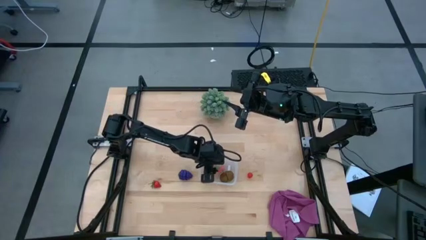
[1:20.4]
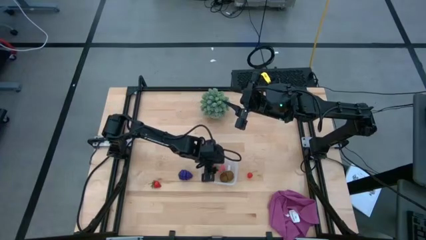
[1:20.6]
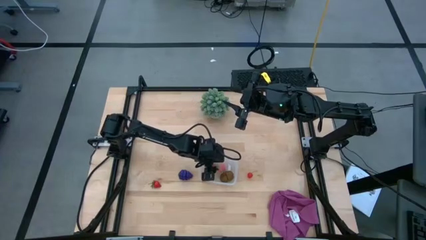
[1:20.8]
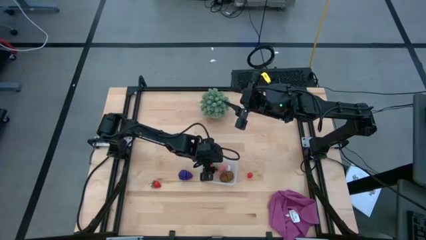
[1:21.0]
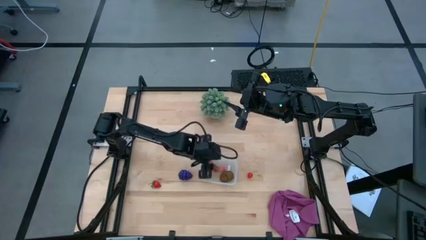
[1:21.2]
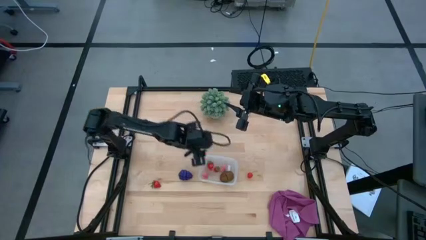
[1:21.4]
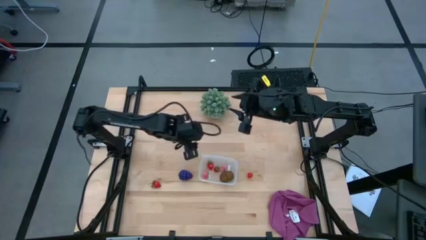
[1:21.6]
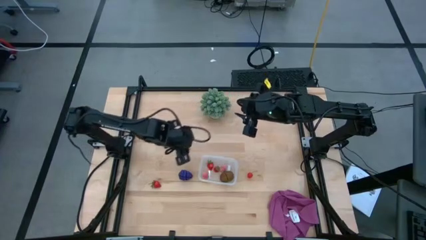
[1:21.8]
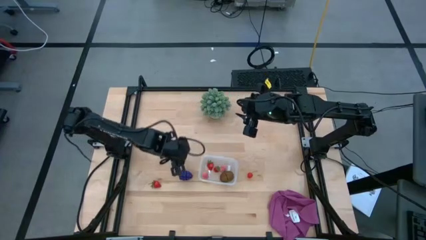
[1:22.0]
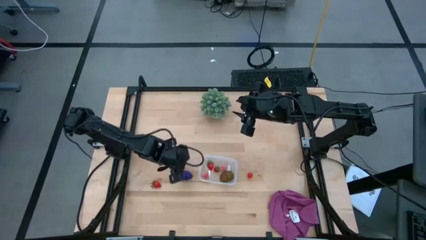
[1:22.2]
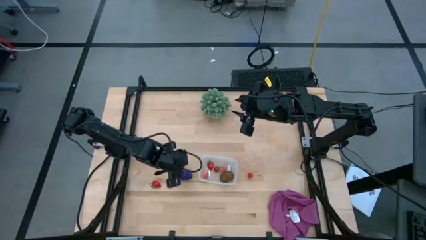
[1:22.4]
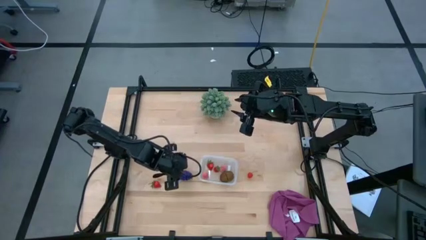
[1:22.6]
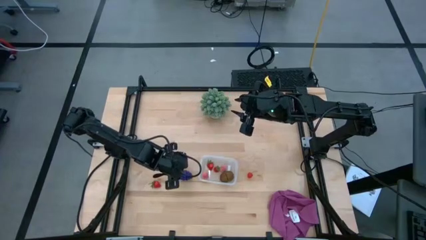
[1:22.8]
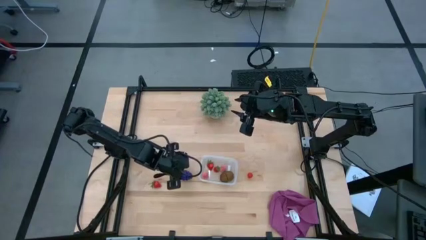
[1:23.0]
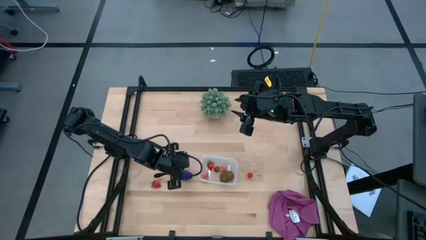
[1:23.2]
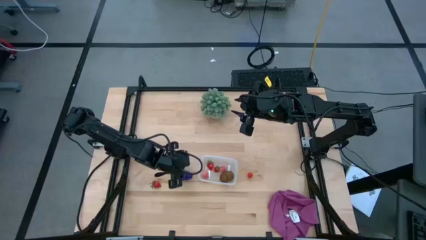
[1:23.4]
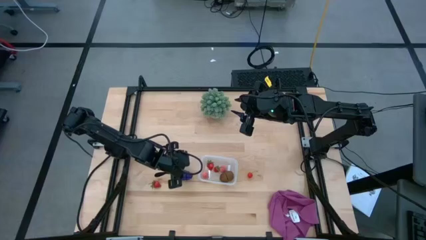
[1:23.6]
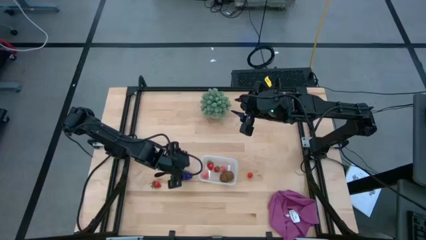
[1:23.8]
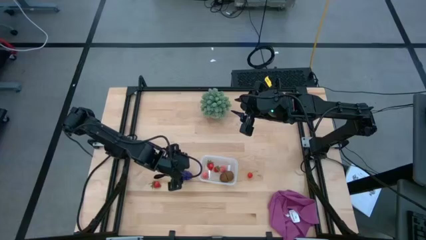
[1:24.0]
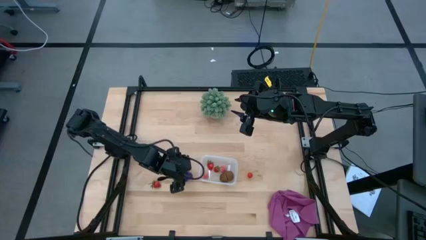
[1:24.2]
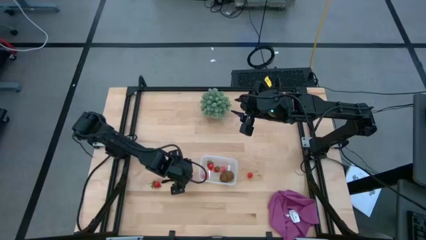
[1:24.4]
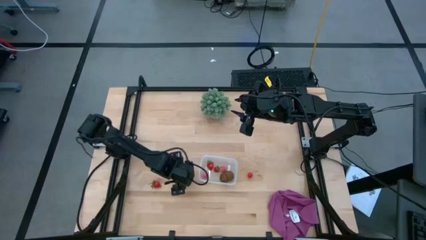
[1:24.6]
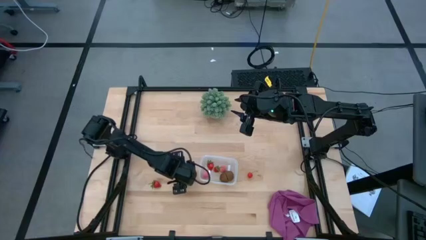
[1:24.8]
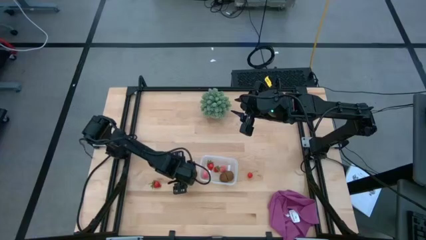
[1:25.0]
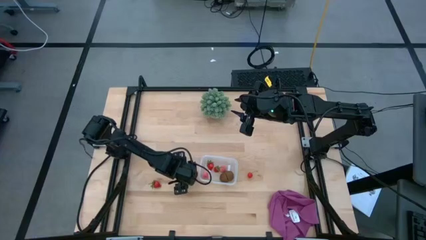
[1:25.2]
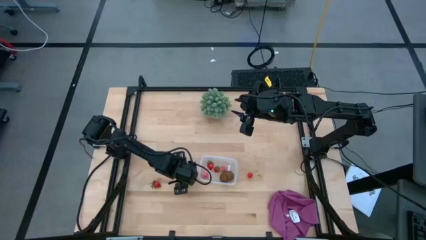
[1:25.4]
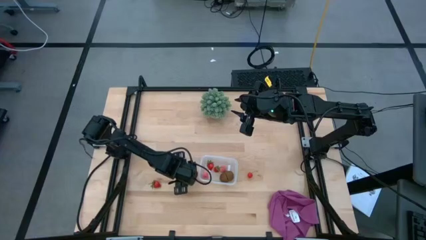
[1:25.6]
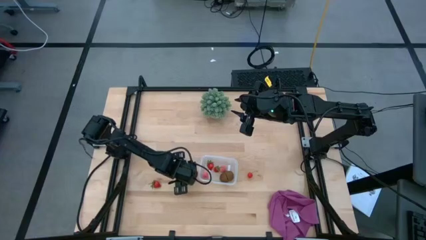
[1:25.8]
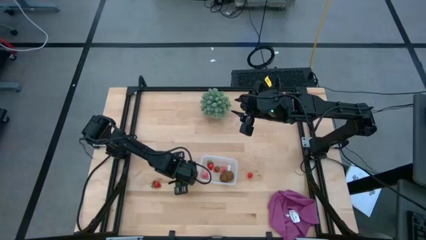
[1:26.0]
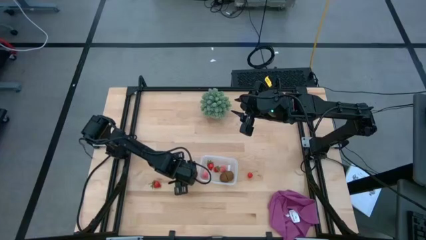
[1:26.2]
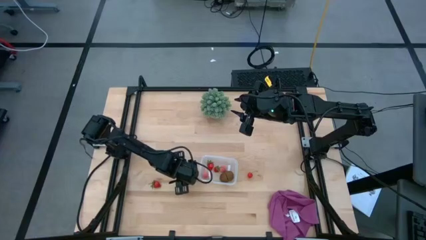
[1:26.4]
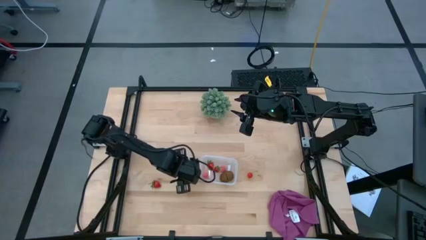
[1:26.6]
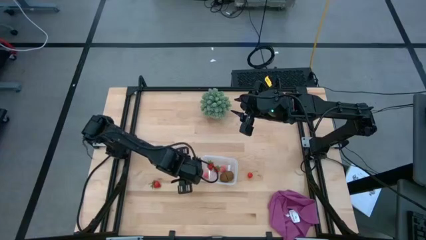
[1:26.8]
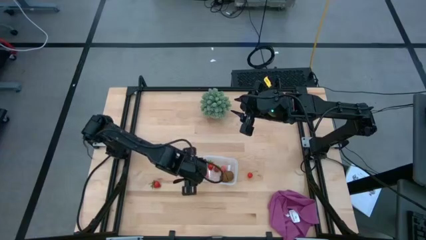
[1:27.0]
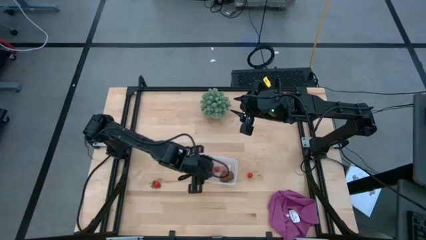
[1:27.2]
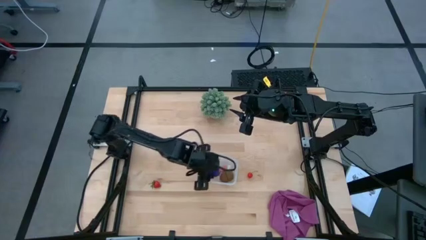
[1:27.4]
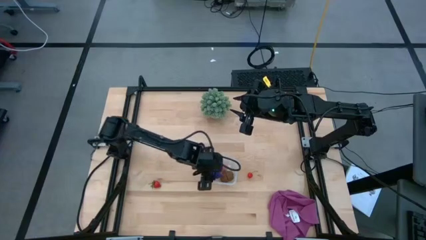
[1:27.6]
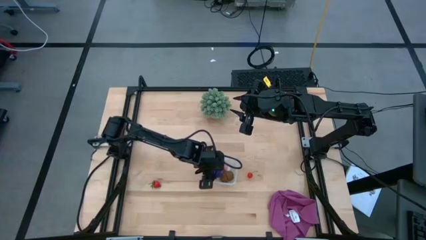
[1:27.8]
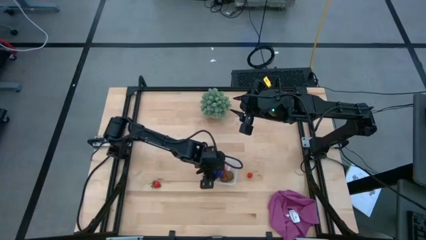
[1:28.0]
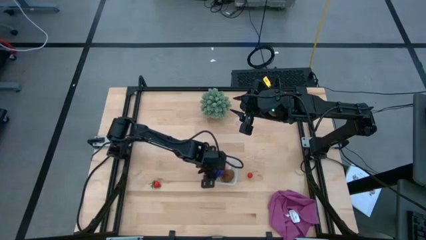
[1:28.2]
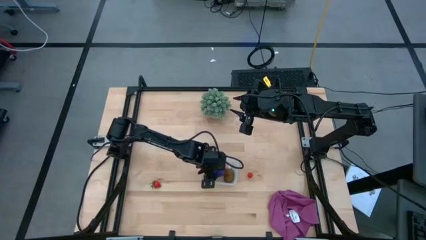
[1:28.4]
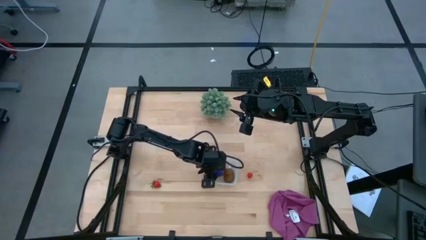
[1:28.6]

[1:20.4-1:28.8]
Task: Pick and placing Produce into tupperware
Put the violet grapes into the bin

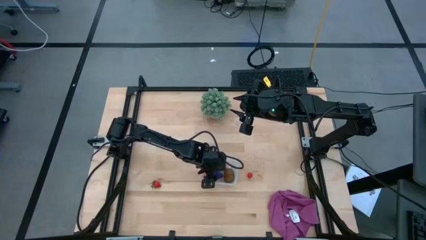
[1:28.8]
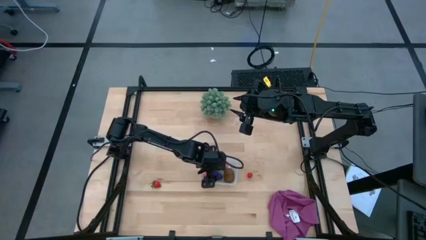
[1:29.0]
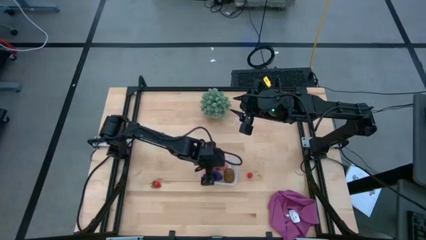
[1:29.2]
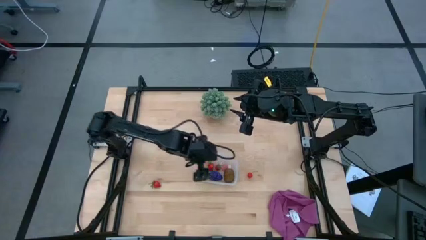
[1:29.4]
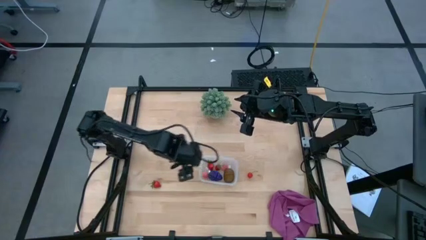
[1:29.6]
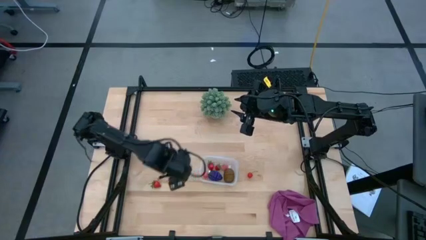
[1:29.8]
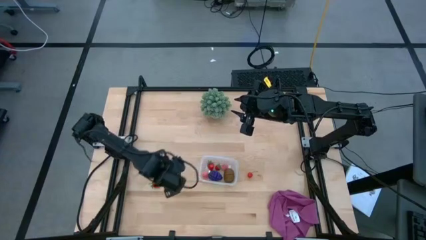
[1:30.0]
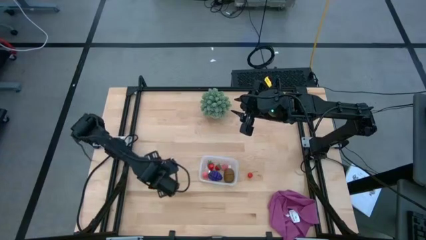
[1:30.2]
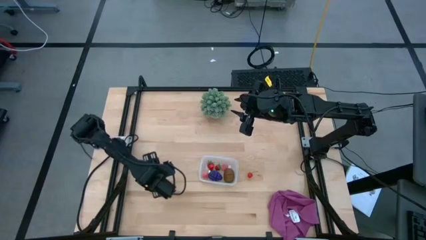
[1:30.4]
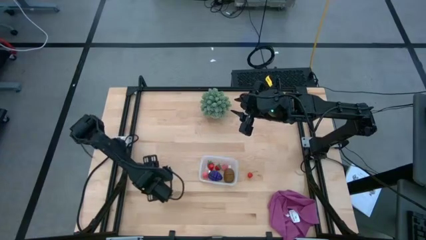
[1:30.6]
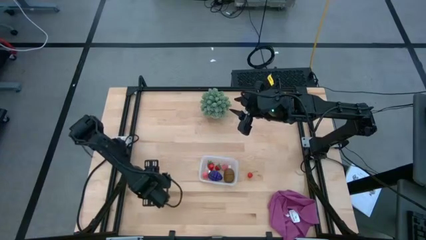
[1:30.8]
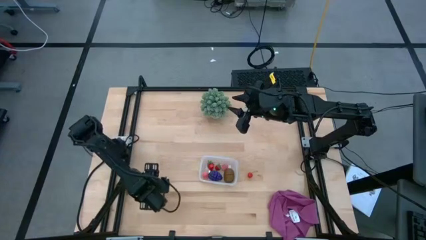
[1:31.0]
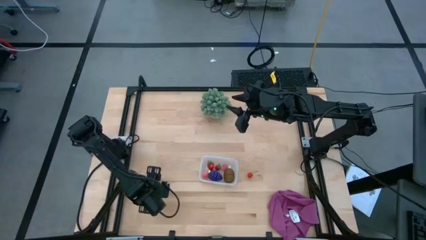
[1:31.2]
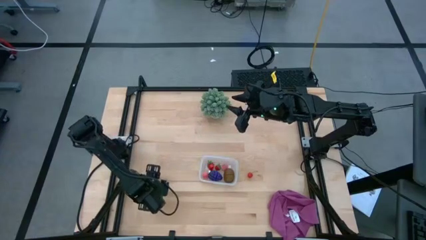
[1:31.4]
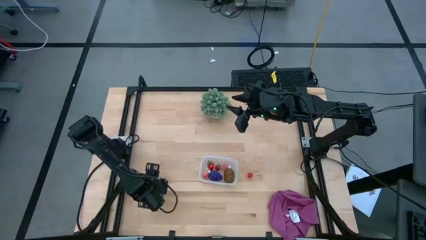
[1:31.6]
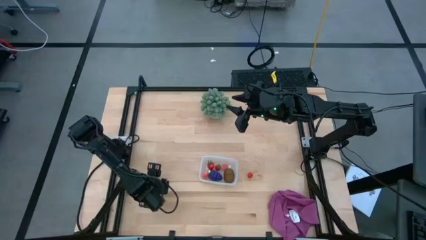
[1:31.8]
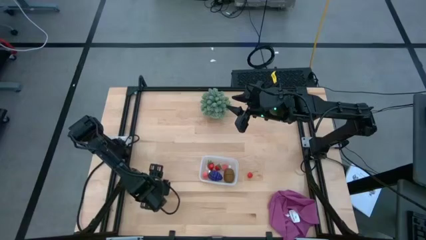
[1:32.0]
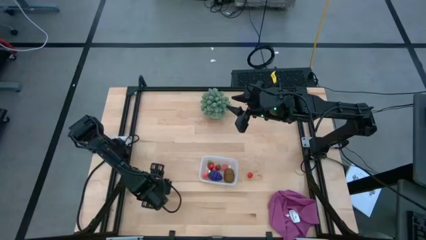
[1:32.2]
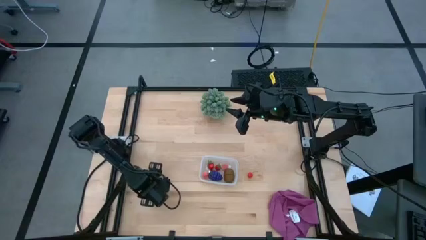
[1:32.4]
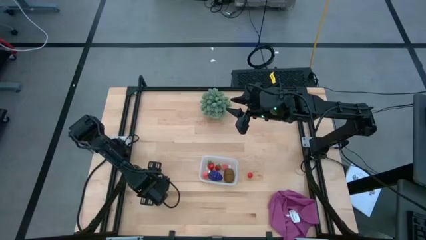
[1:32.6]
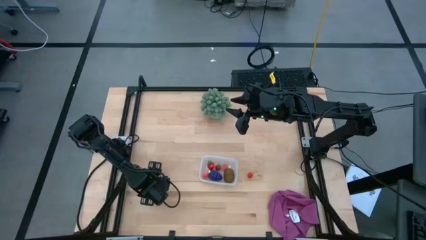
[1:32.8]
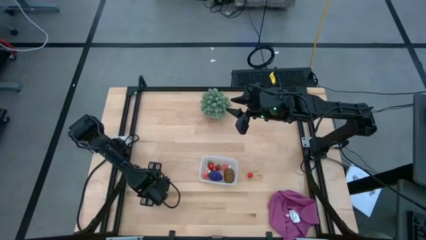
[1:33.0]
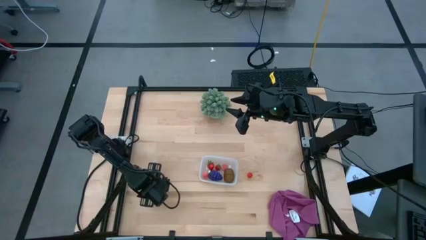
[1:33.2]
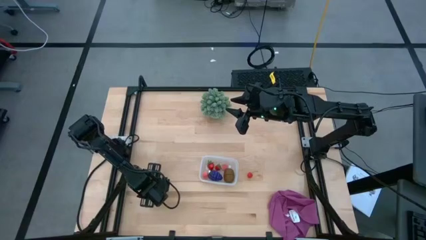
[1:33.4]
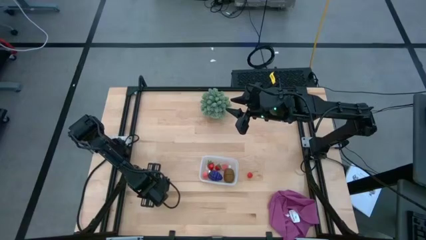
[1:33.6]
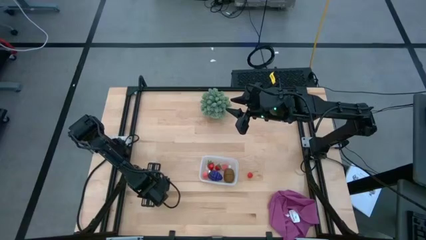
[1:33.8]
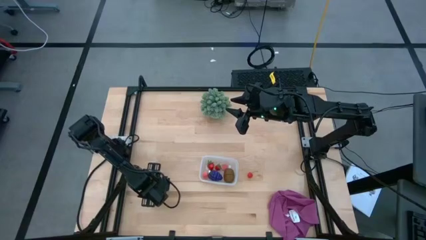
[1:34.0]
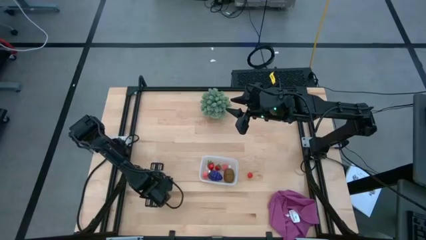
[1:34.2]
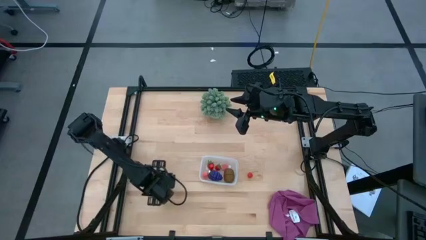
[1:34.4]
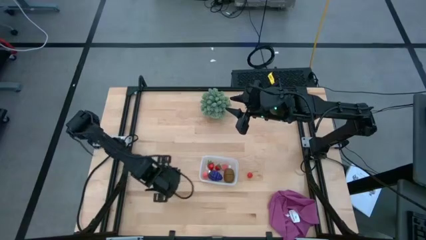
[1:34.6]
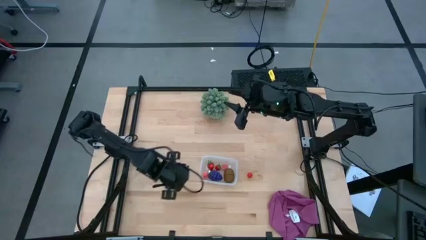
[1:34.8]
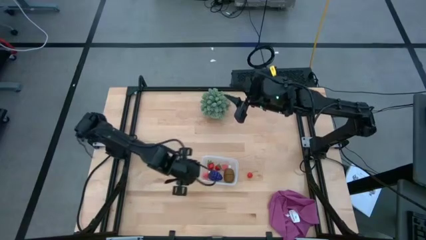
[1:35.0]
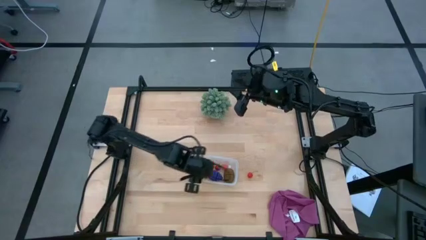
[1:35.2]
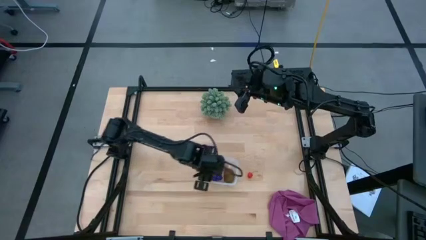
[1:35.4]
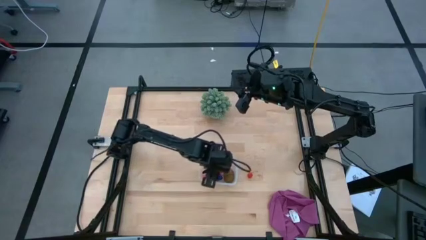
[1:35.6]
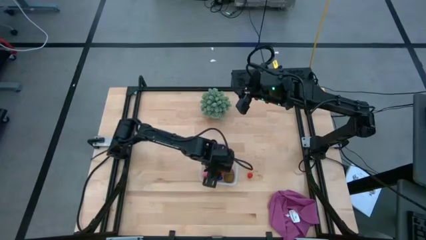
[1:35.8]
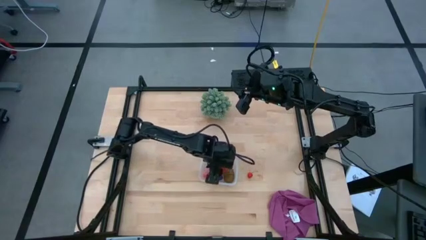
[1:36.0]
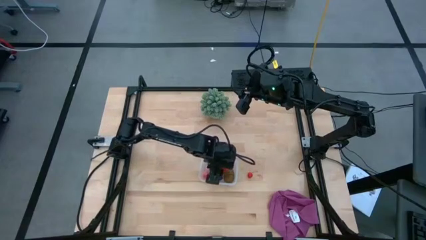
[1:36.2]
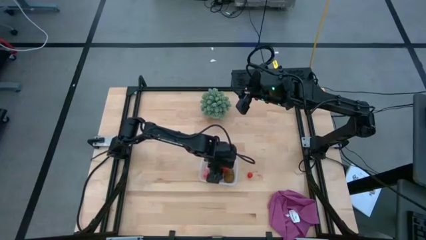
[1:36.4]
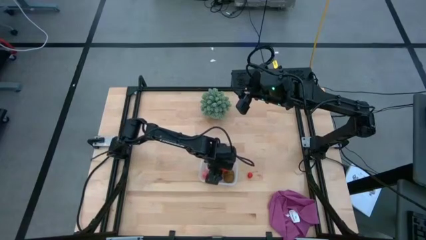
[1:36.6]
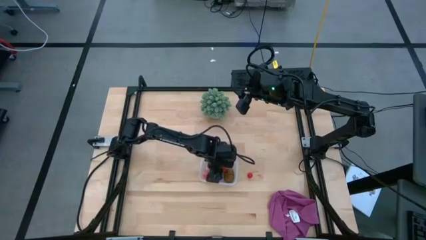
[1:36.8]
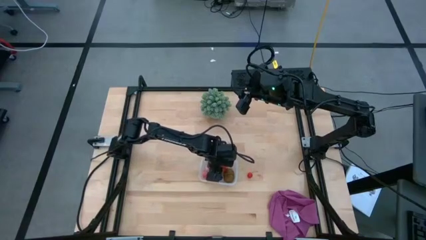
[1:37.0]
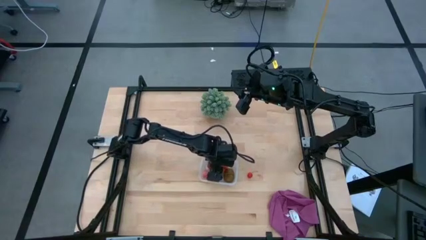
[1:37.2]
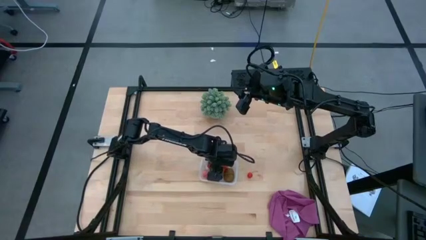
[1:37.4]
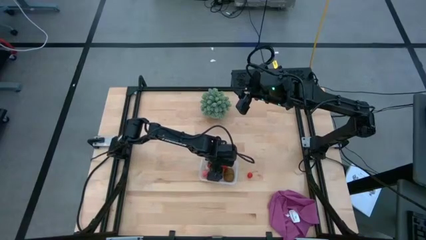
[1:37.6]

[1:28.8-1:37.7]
Put the red strawberry into the bin
